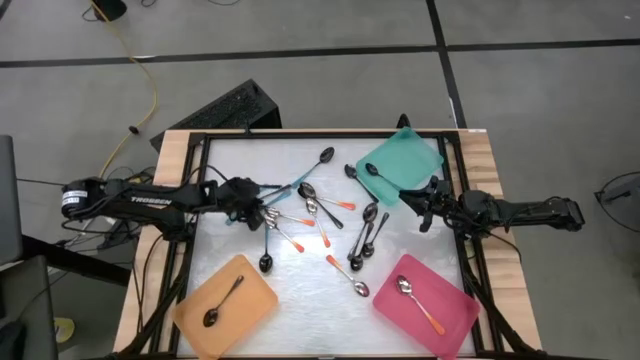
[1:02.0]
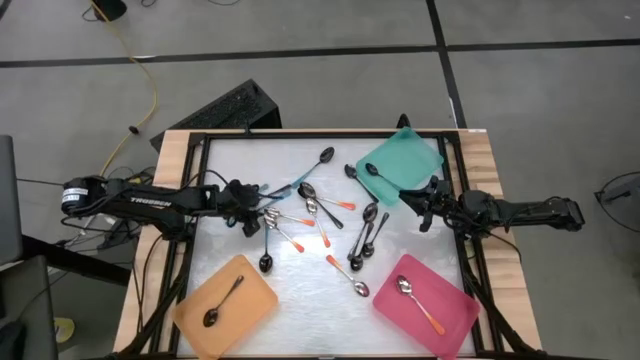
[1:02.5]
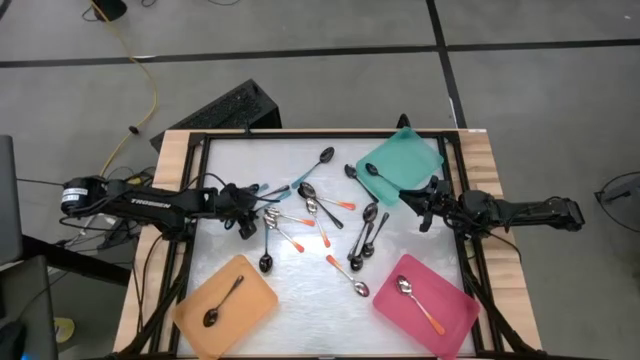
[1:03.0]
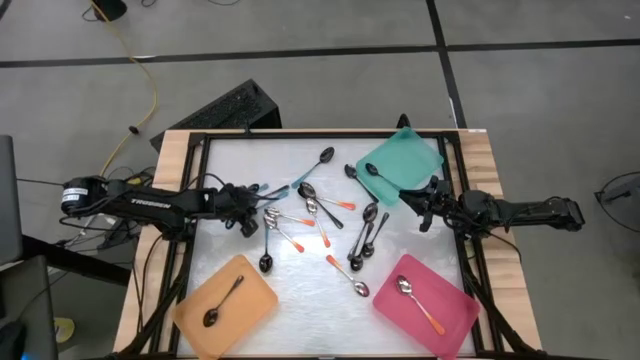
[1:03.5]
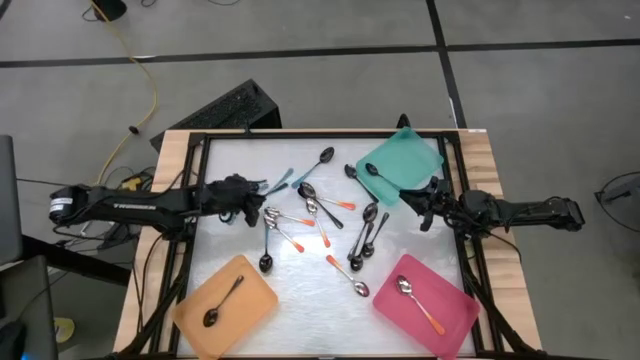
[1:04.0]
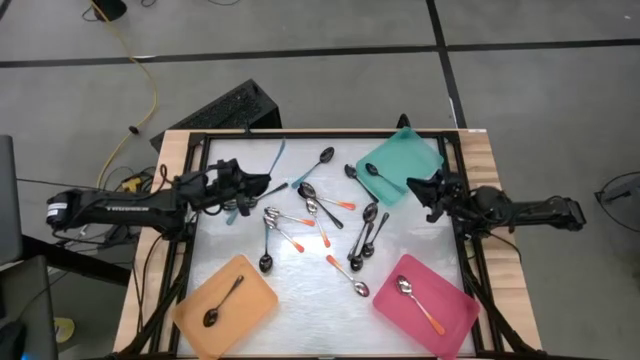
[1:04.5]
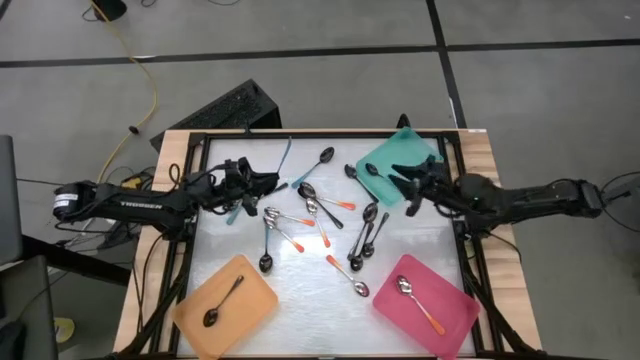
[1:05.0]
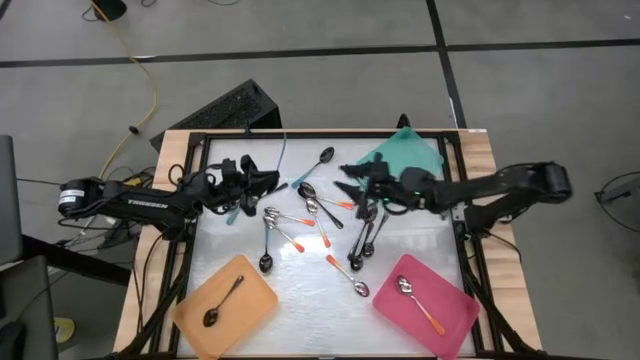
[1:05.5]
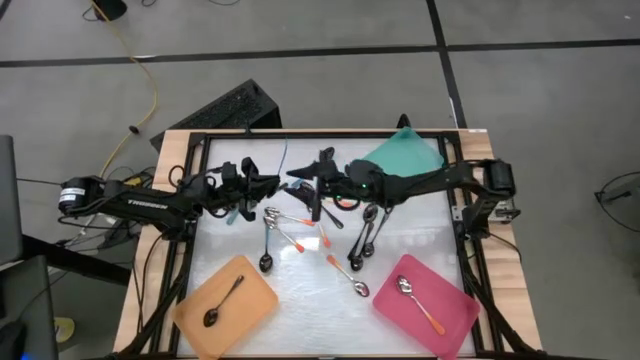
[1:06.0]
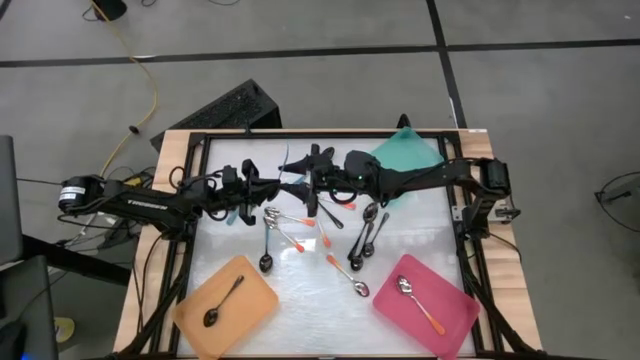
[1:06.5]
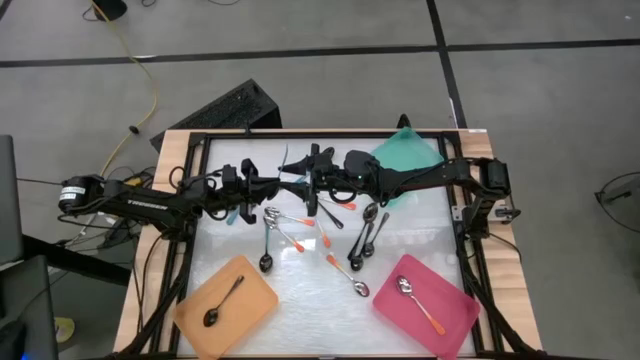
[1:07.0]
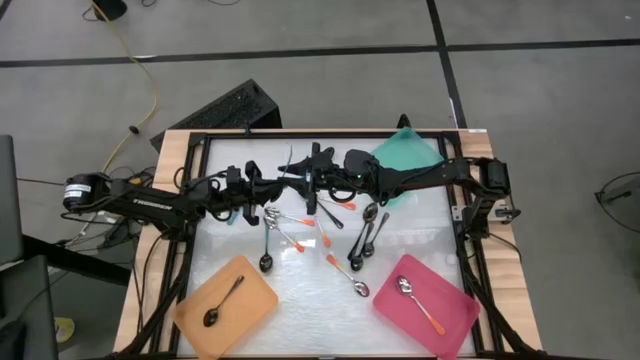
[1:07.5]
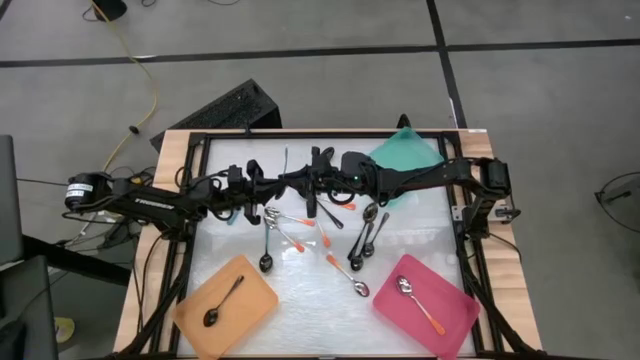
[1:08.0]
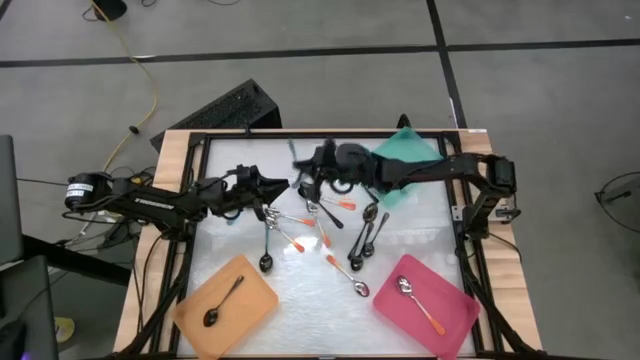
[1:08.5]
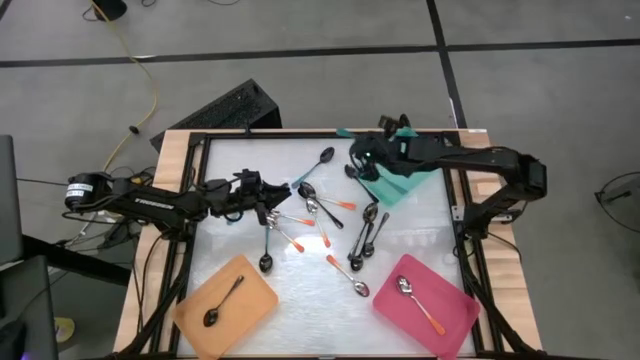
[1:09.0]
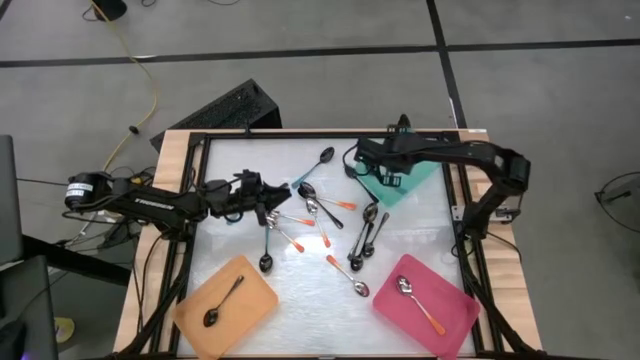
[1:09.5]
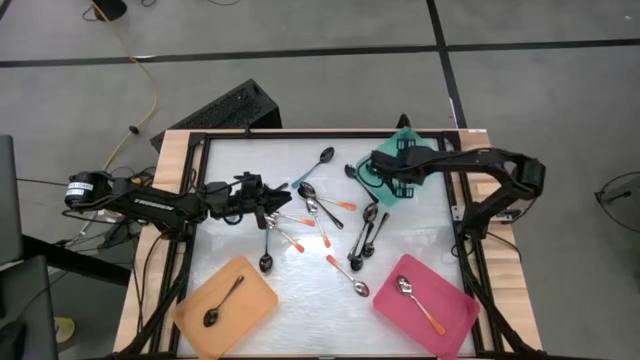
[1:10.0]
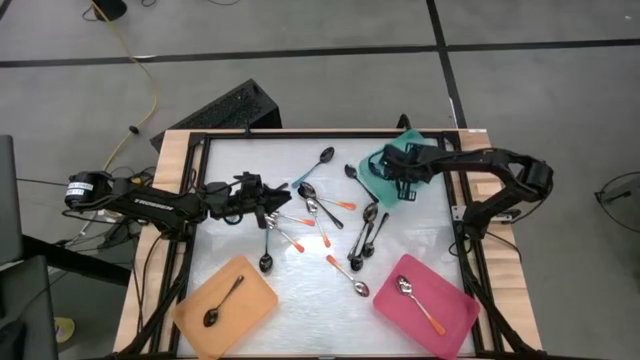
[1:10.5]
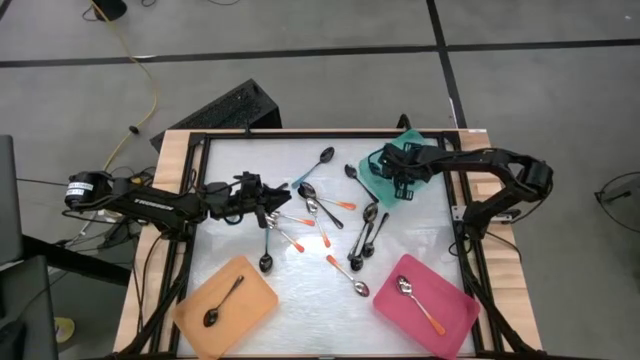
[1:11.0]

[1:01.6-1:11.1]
Task: Sort silverware by color (type)
Put the blue spoon into the blue bin

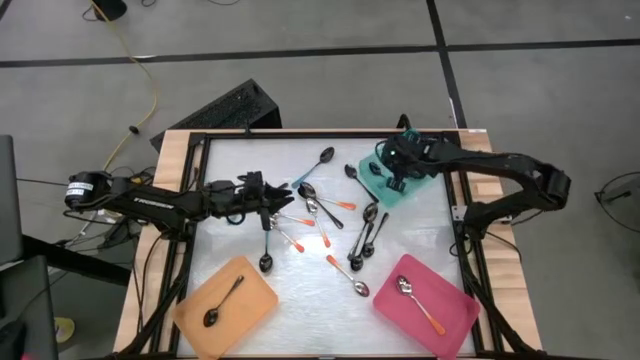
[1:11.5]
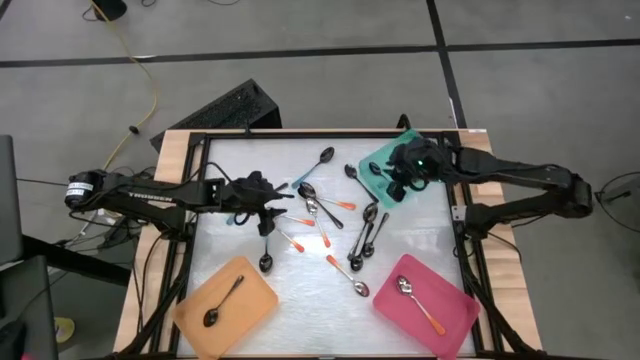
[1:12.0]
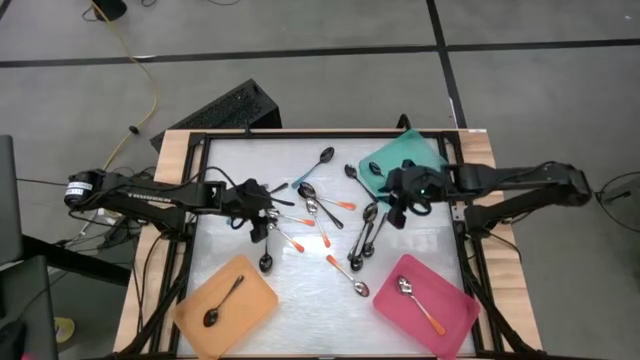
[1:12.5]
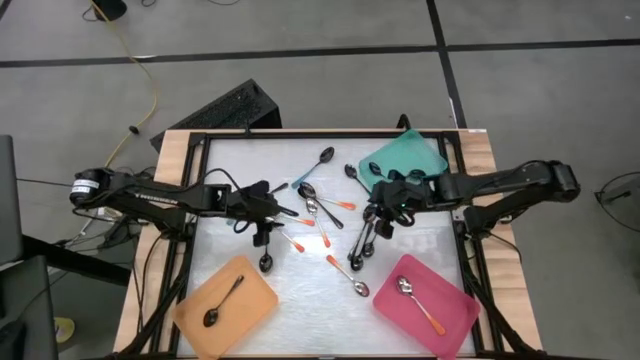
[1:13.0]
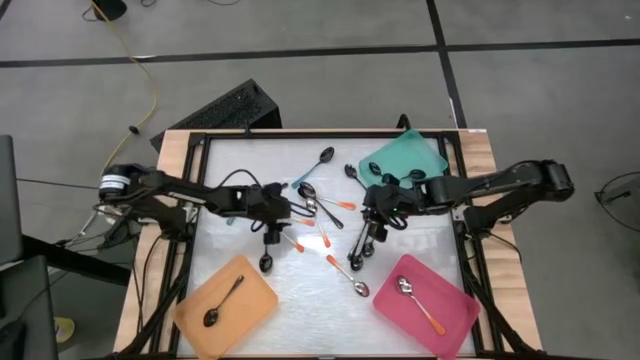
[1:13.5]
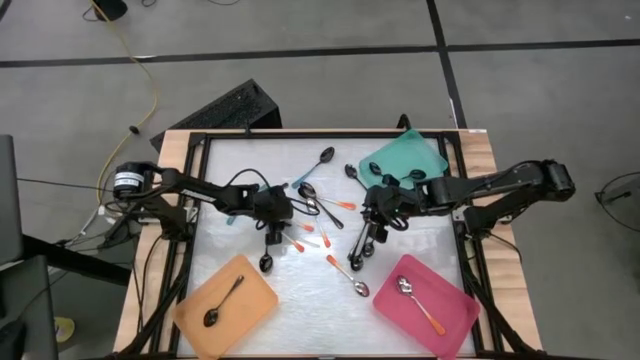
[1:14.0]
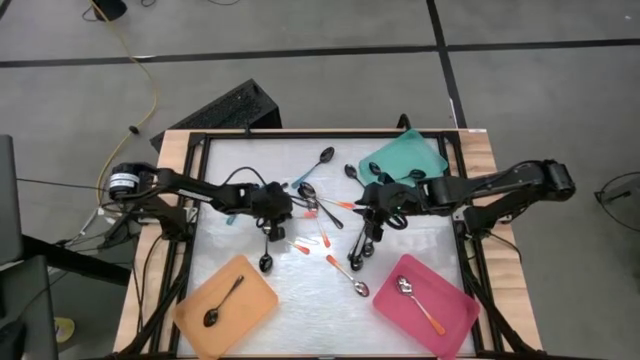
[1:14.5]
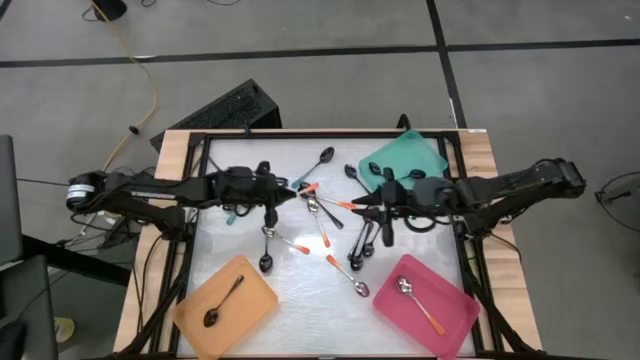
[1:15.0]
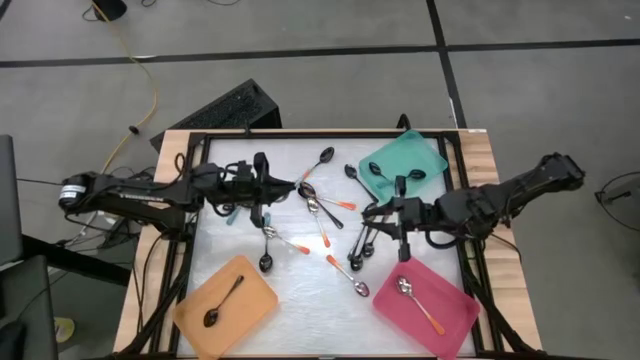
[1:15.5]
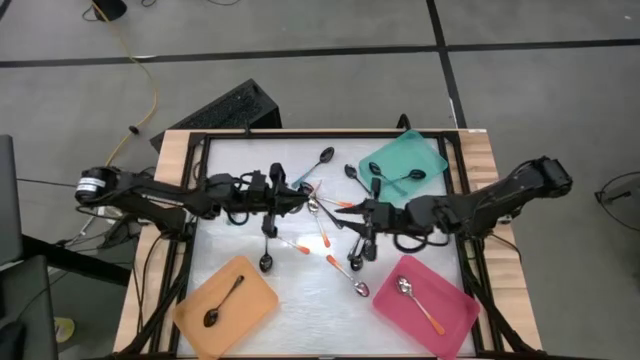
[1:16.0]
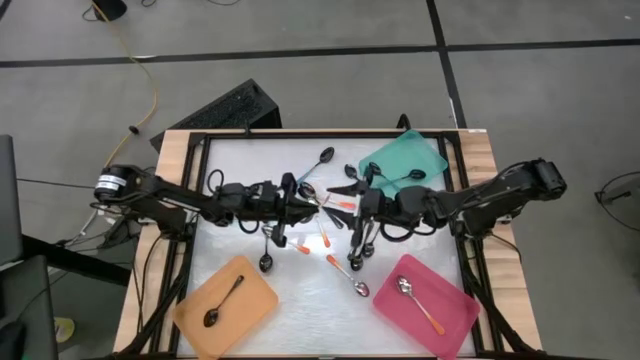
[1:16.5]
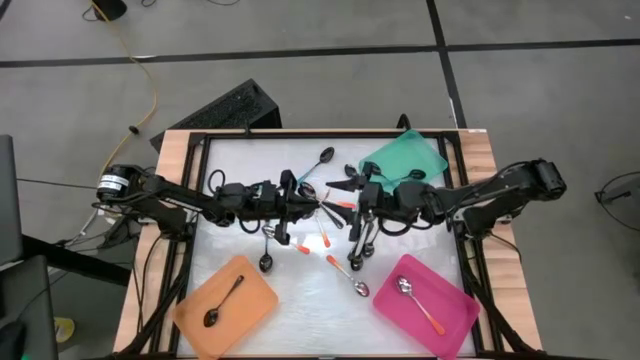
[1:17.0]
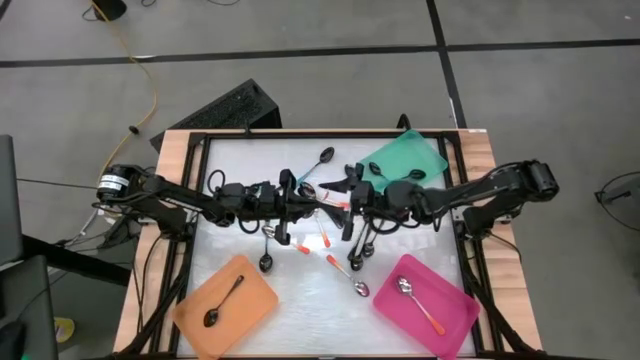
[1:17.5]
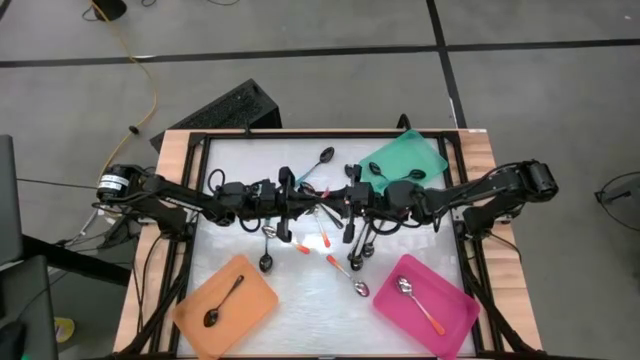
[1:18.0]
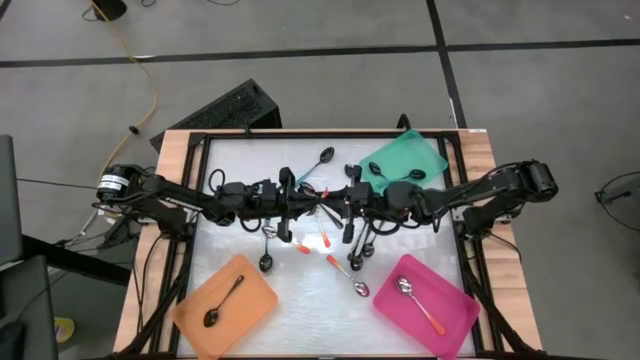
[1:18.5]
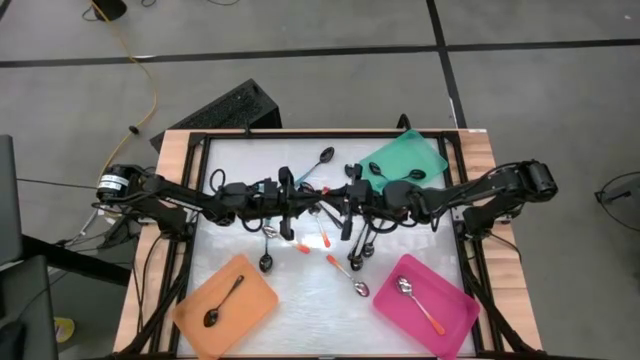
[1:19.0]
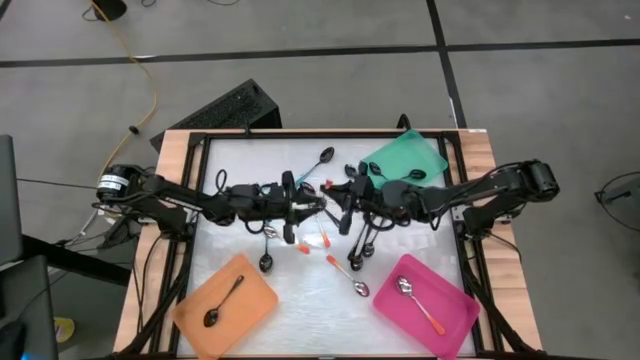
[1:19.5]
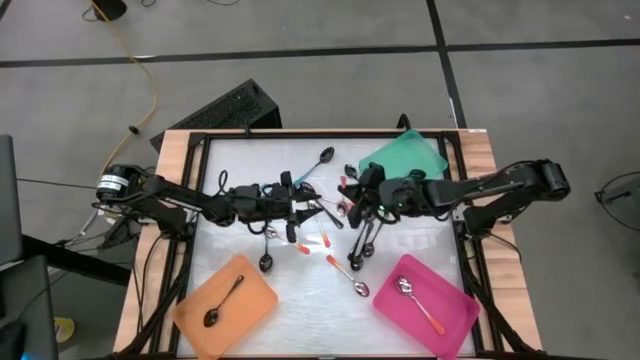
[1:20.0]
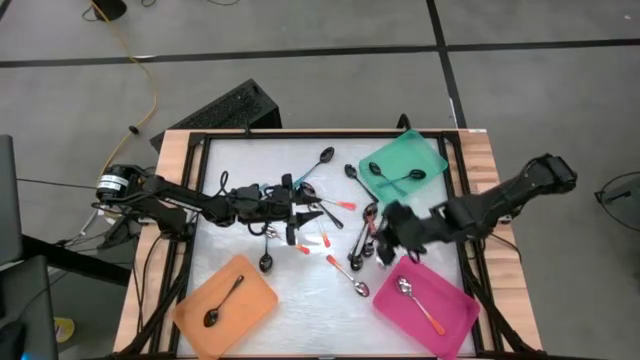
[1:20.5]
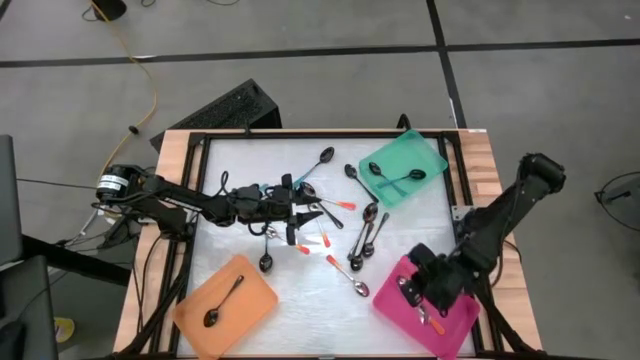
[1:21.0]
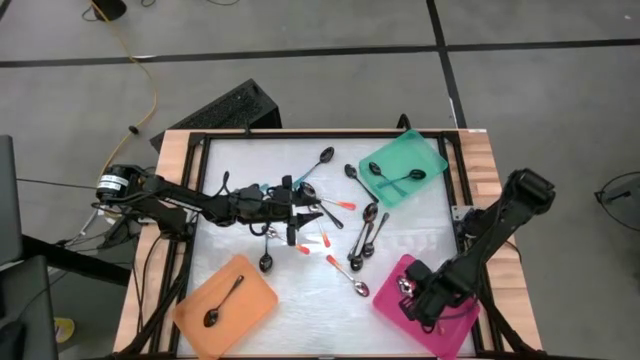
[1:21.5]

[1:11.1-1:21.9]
Put the orange spoon into the red bin
